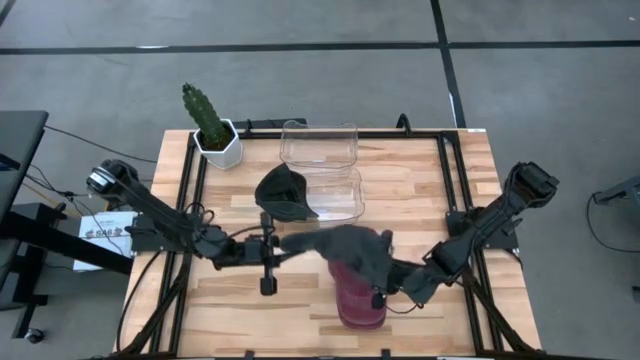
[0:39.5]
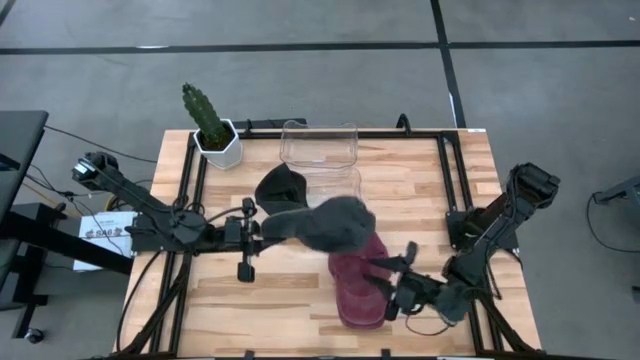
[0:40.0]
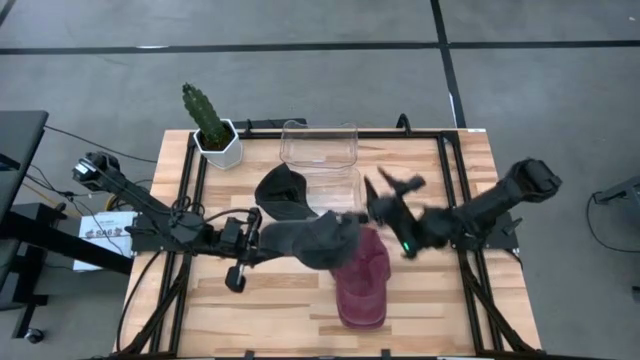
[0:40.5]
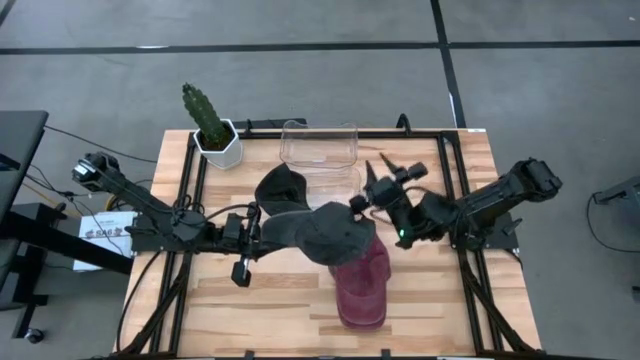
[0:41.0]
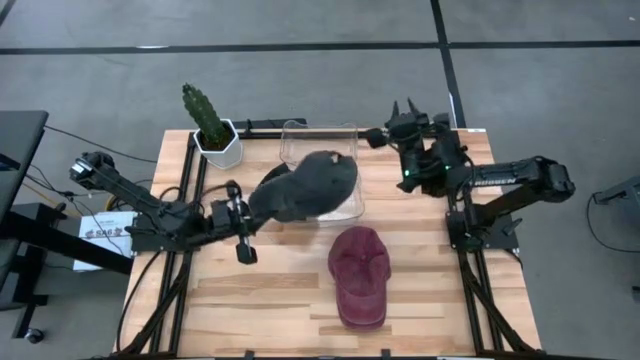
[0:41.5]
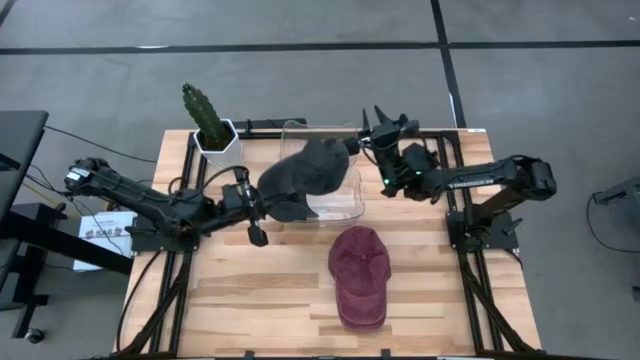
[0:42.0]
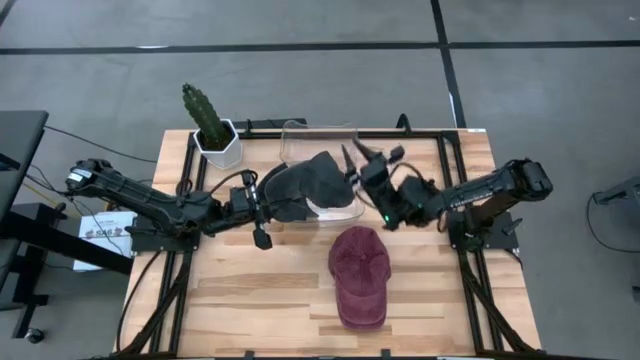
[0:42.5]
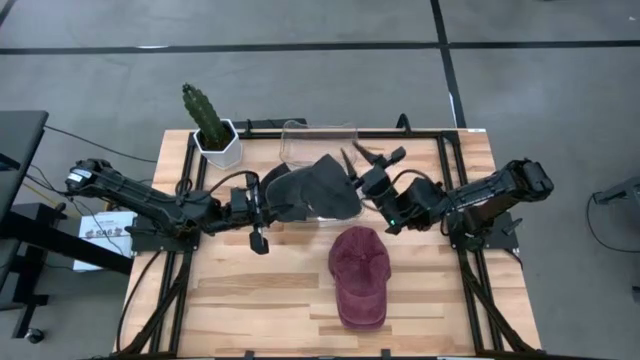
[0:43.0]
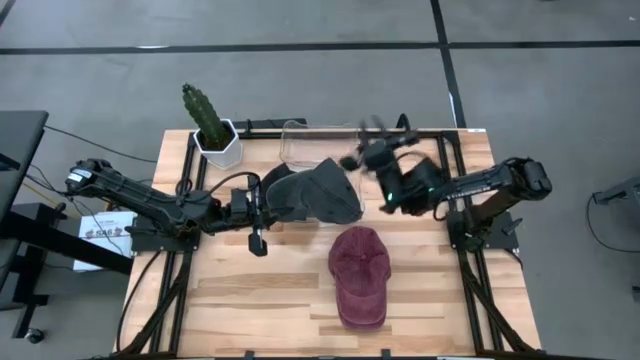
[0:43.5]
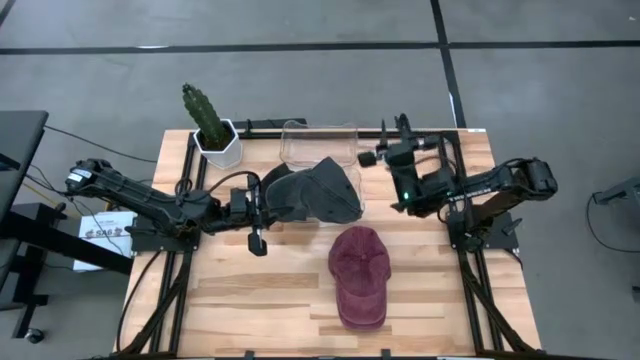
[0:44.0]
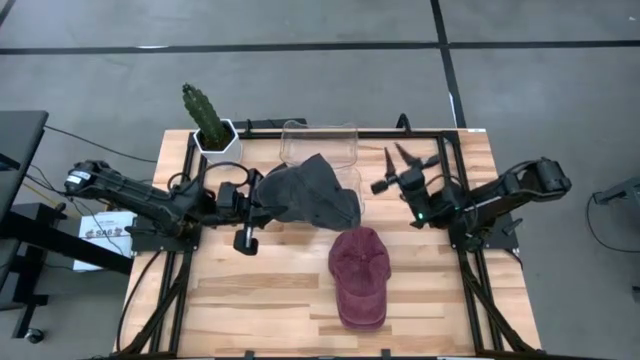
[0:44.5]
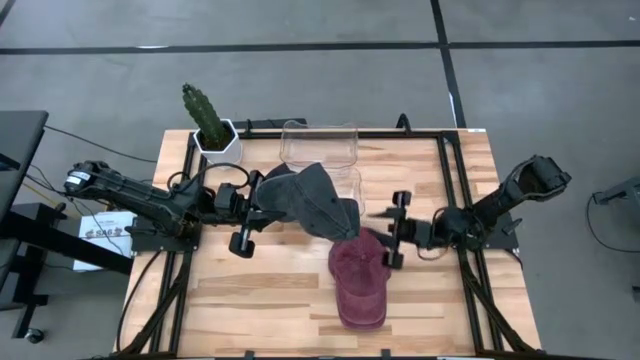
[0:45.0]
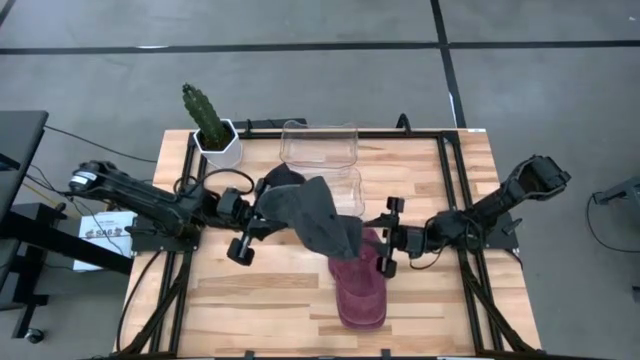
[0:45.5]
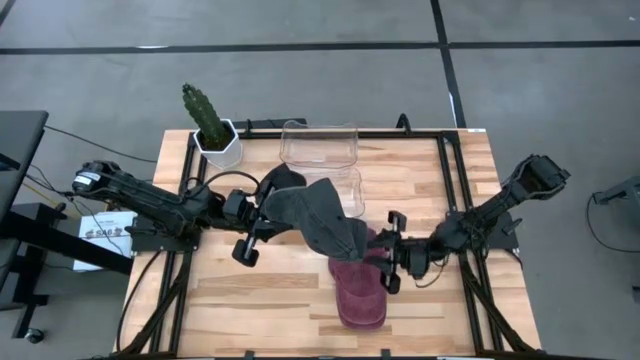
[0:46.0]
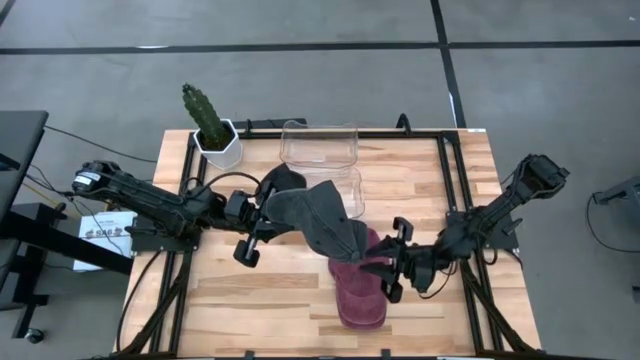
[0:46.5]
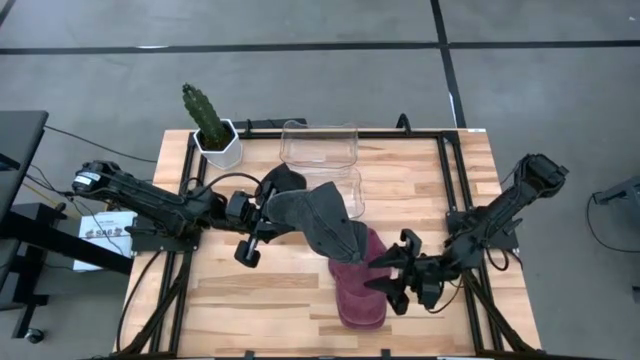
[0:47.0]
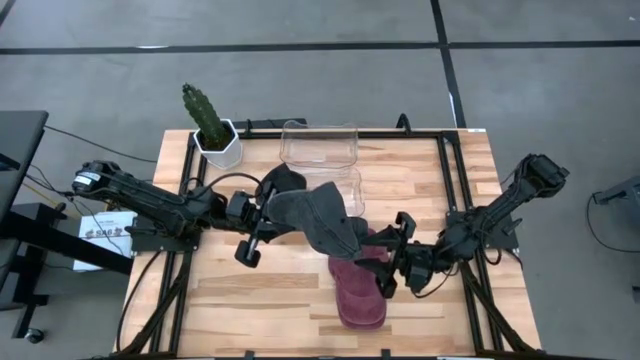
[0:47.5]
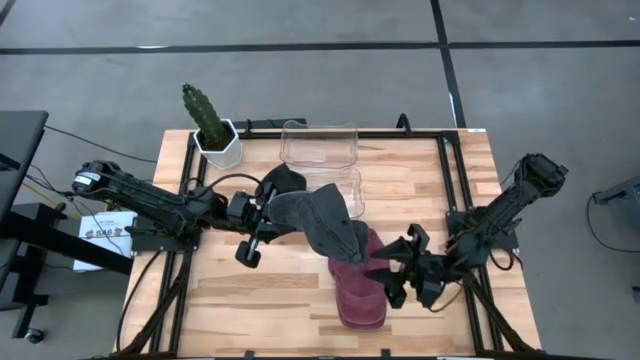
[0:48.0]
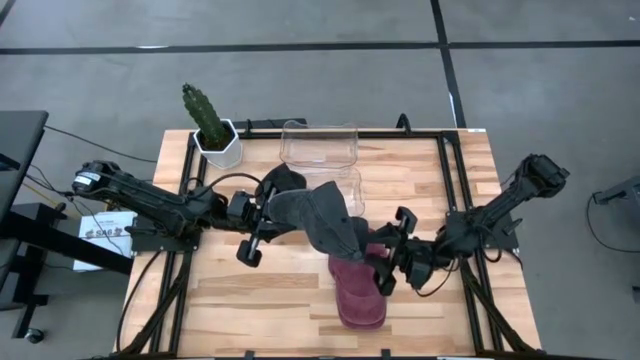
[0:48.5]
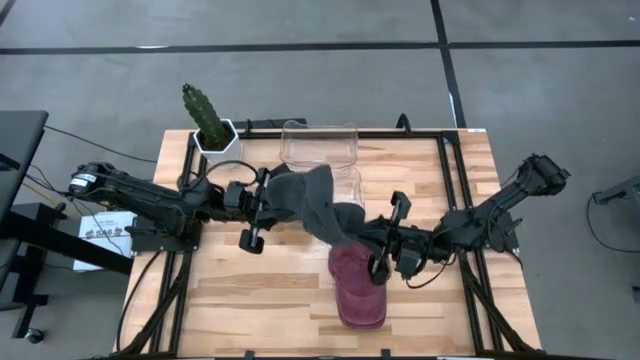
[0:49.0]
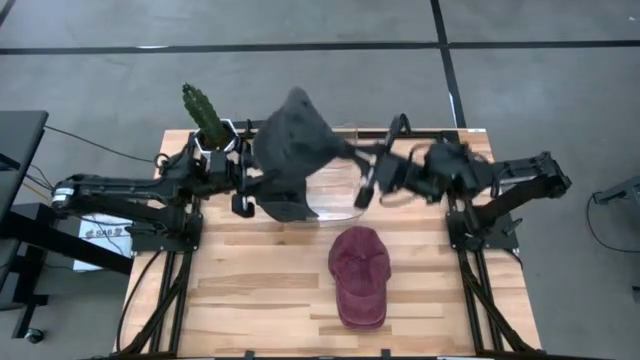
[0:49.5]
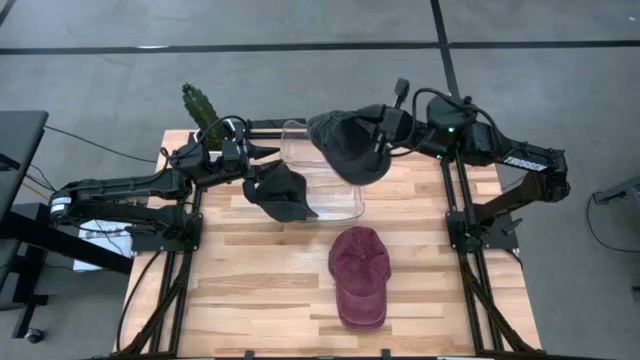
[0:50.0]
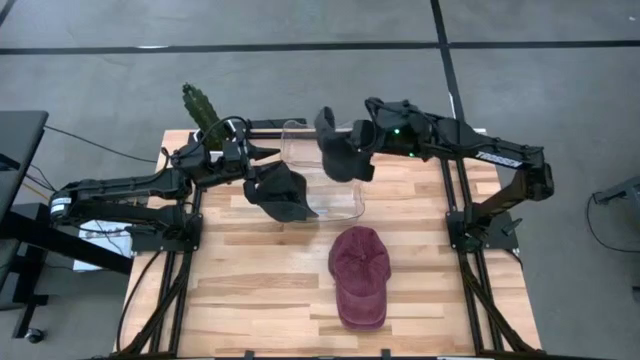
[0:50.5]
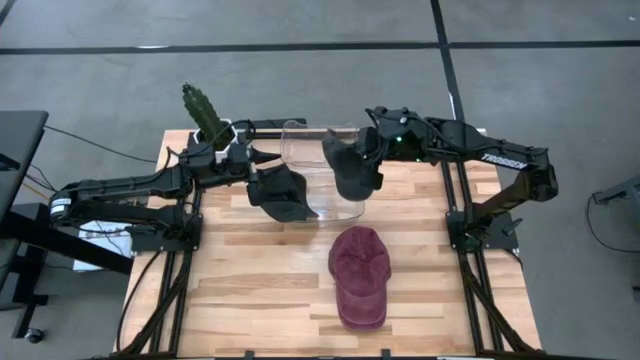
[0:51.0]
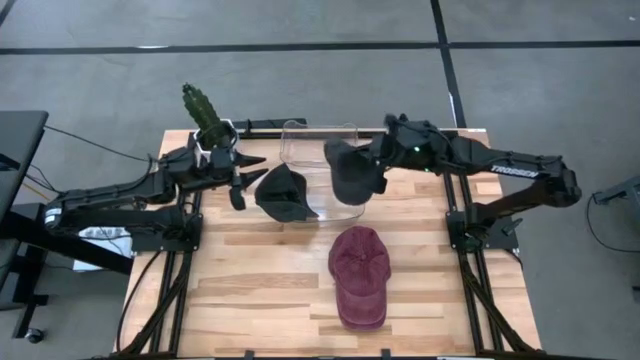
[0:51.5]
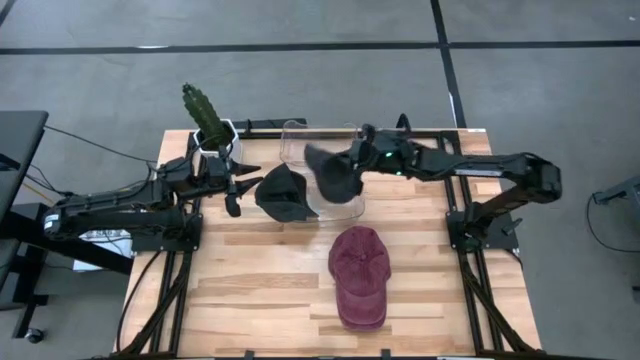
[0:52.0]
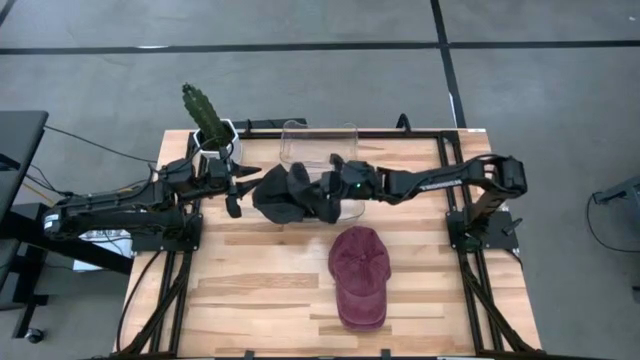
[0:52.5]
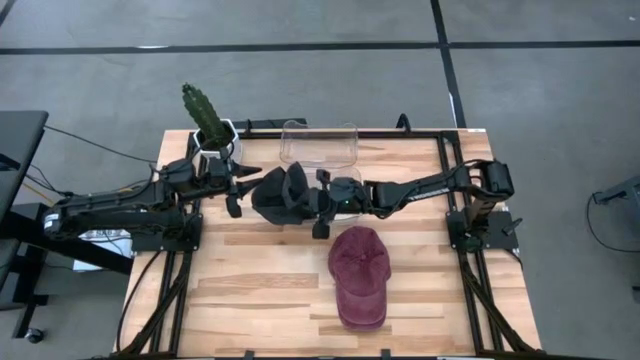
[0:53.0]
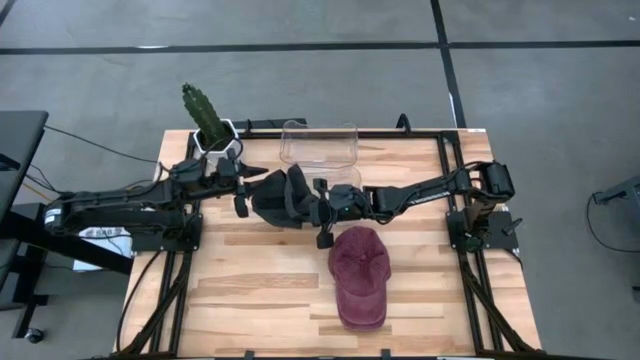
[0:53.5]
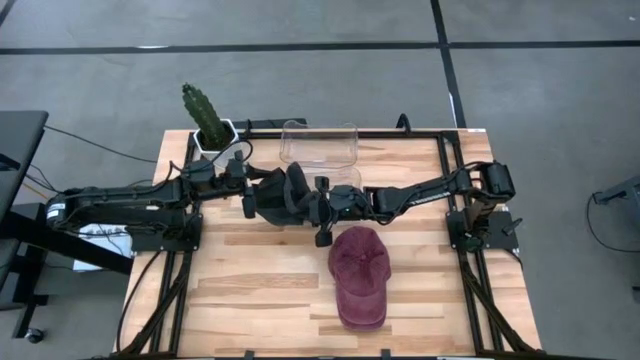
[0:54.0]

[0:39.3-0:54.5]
Task: Pick & Place hat
Put the black cap into the bottom transparent bin

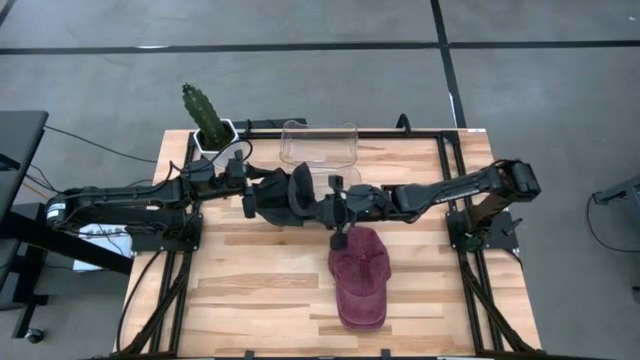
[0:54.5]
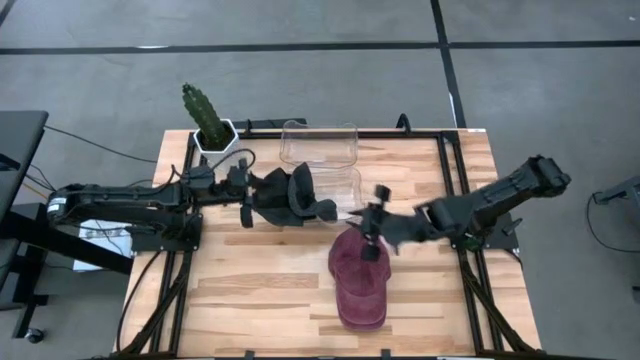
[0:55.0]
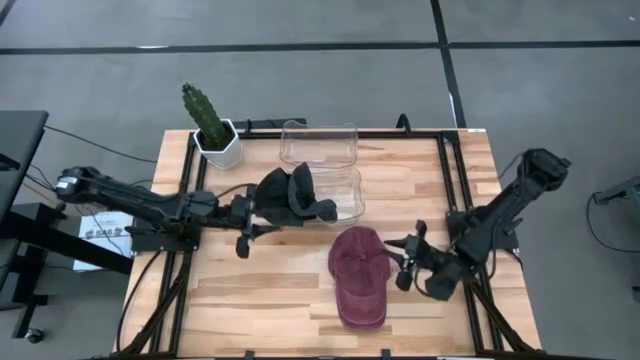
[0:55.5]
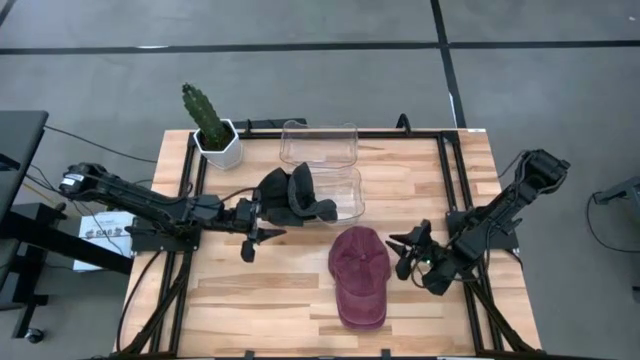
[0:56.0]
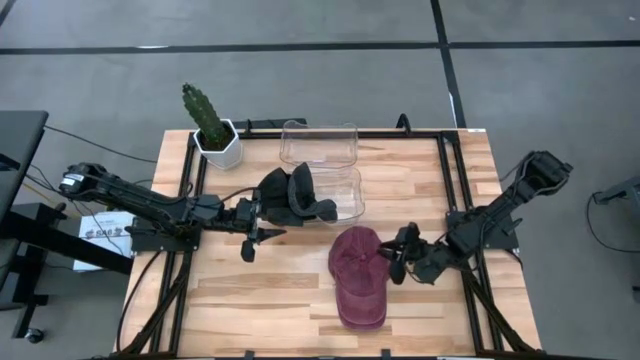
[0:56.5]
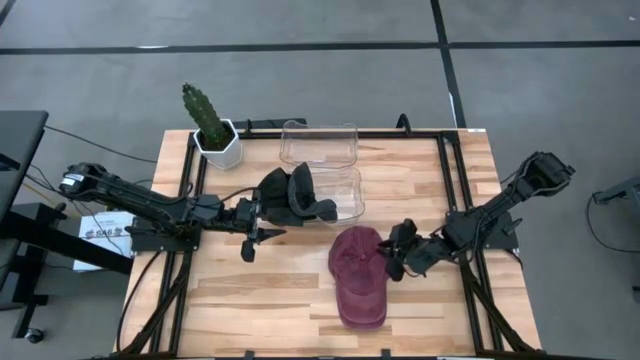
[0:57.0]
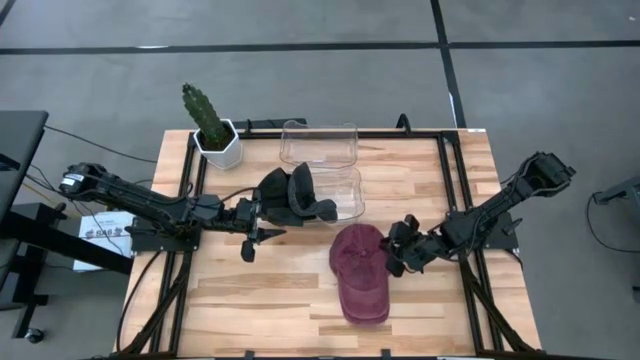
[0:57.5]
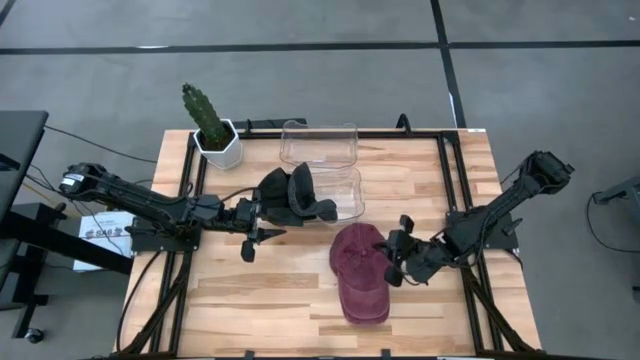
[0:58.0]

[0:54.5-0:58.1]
Put the top red cap into the top transparent bin

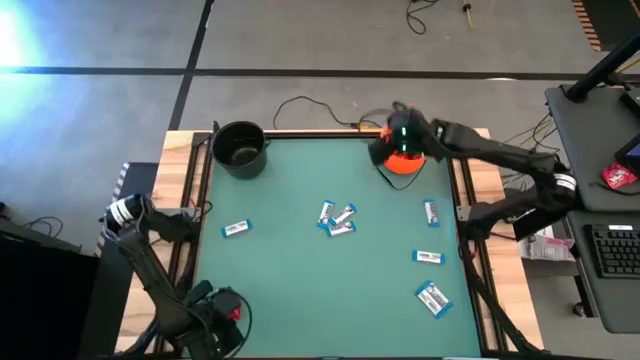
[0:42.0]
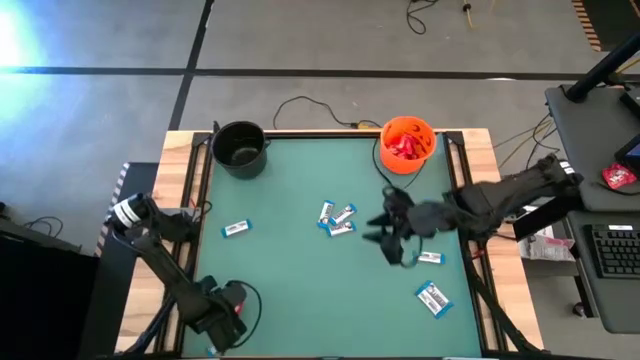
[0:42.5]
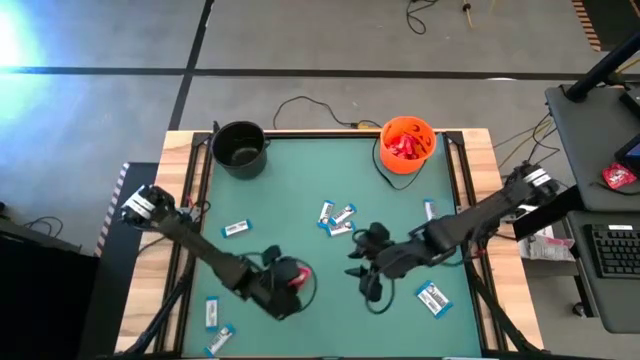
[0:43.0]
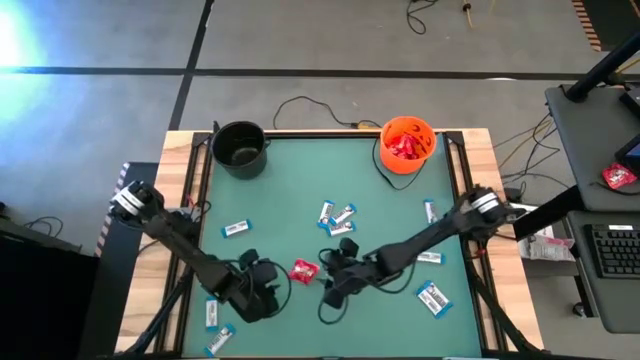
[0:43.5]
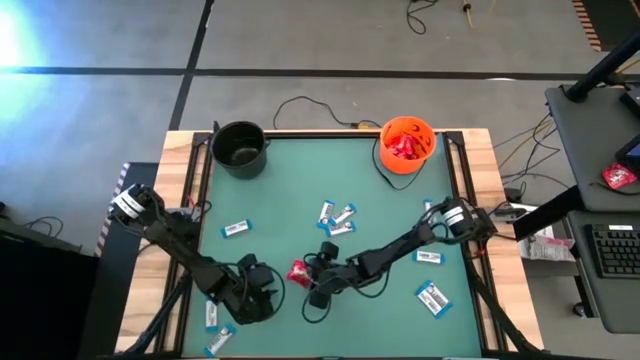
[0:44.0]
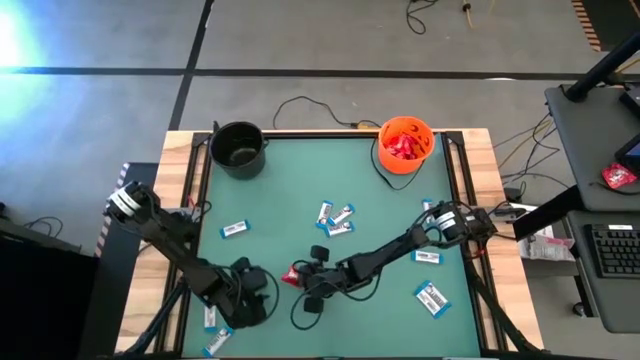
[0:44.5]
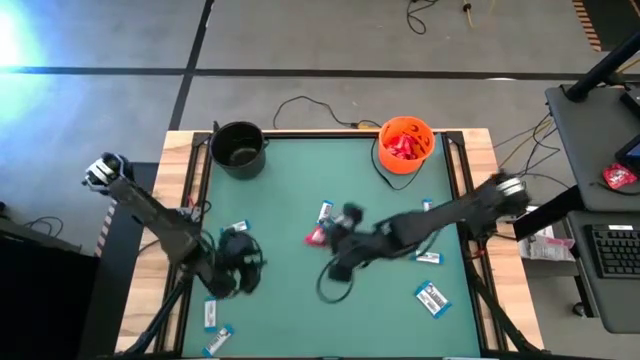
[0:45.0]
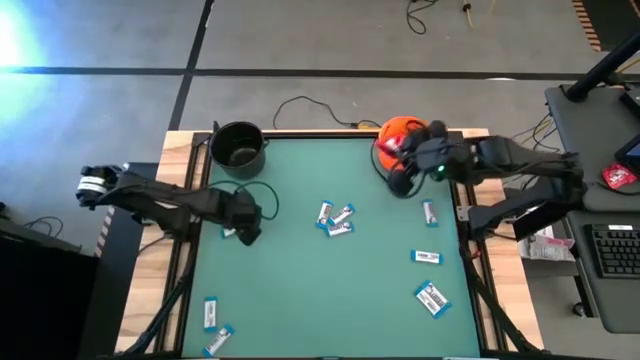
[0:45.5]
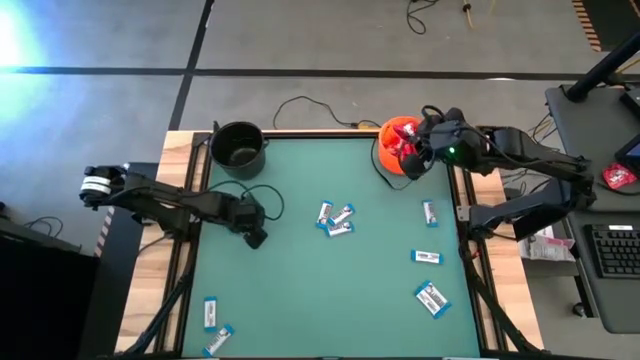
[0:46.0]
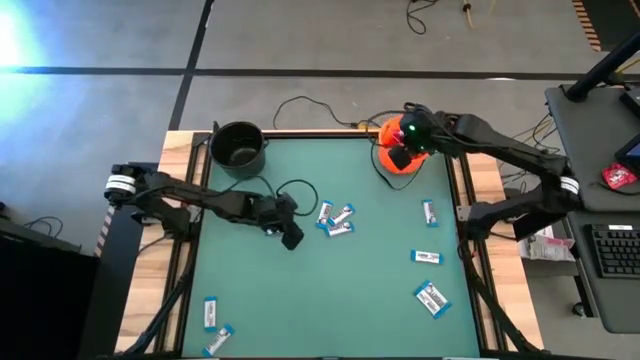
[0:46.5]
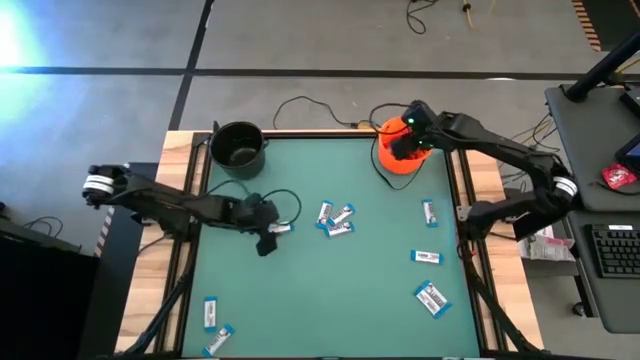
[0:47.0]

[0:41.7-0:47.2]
Task: Sort candy by brand, put in halloween buckets
Put the red candy into the orange bucket
